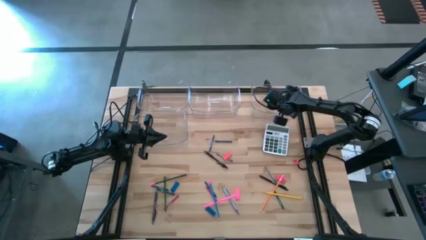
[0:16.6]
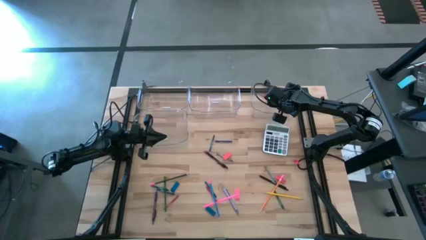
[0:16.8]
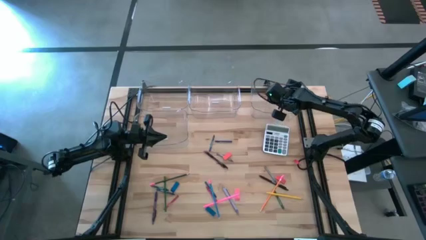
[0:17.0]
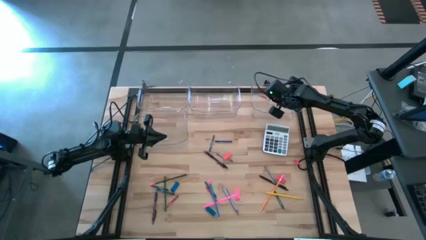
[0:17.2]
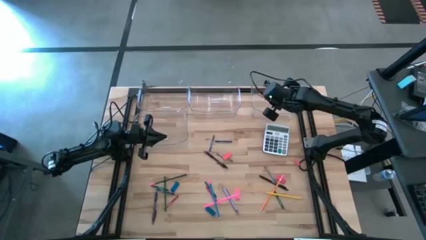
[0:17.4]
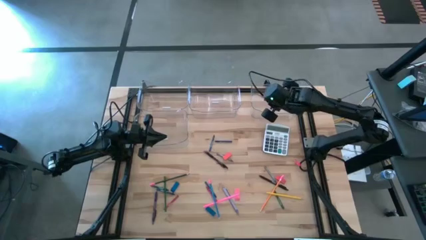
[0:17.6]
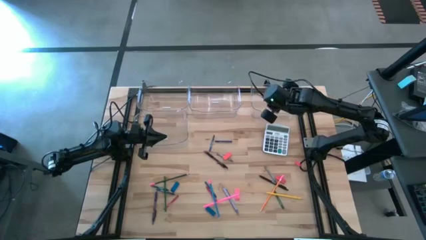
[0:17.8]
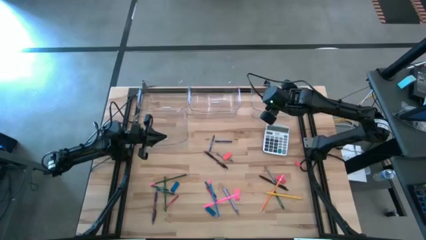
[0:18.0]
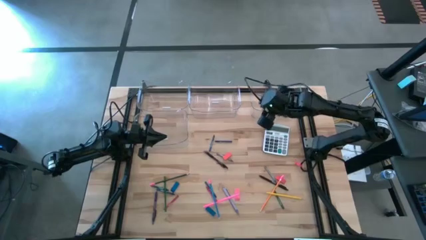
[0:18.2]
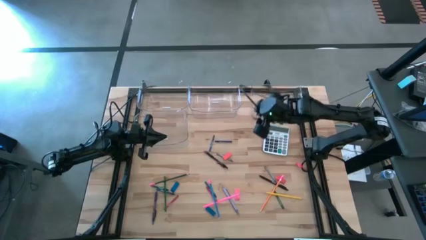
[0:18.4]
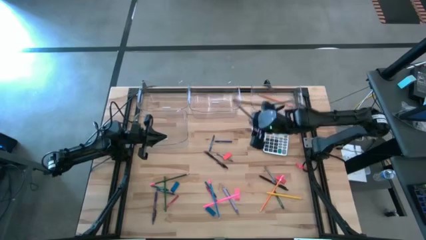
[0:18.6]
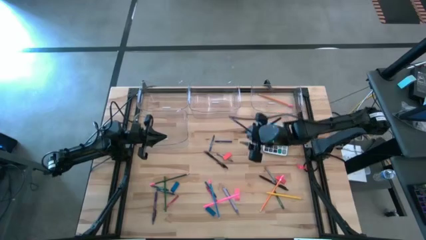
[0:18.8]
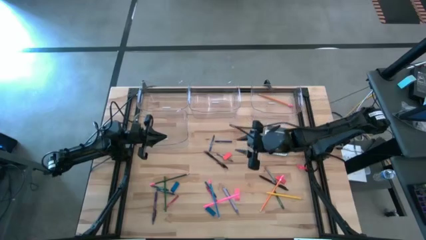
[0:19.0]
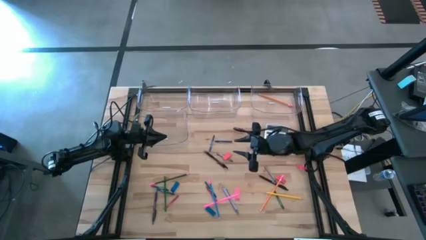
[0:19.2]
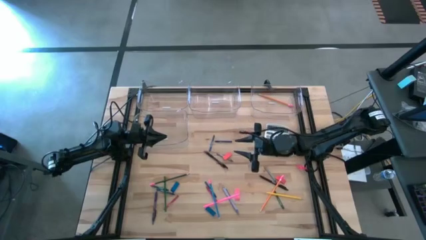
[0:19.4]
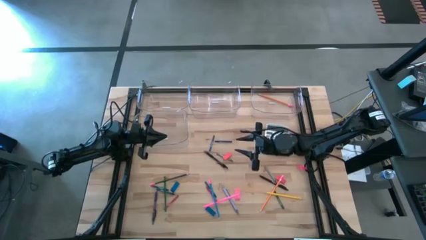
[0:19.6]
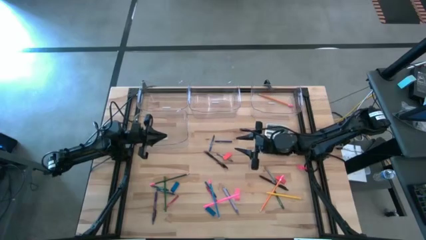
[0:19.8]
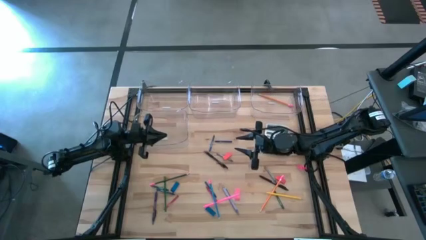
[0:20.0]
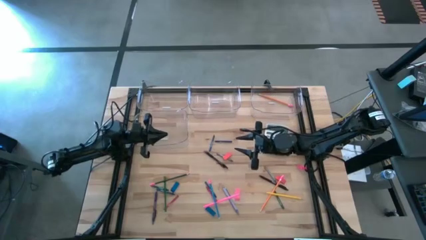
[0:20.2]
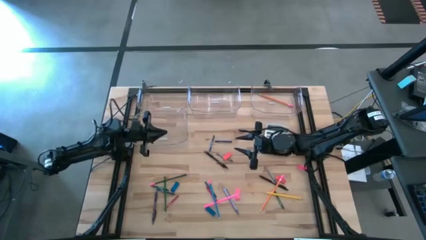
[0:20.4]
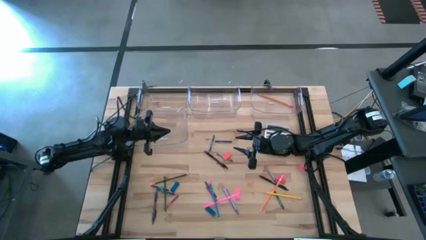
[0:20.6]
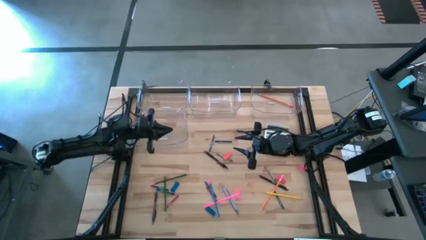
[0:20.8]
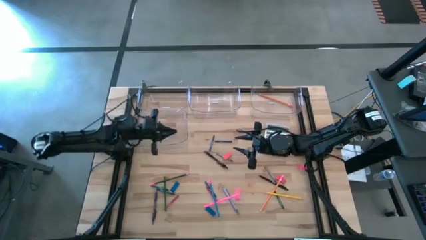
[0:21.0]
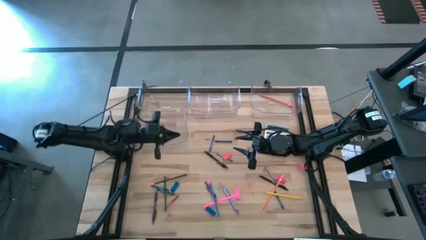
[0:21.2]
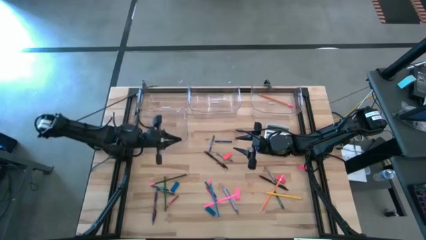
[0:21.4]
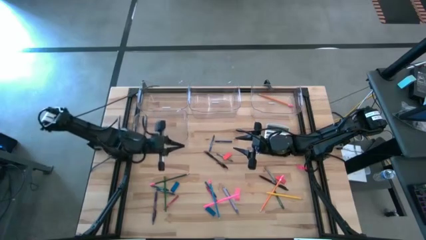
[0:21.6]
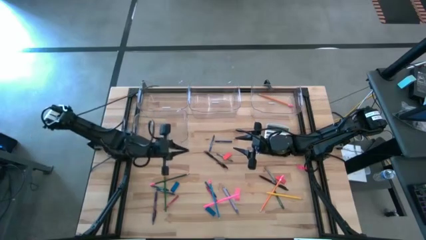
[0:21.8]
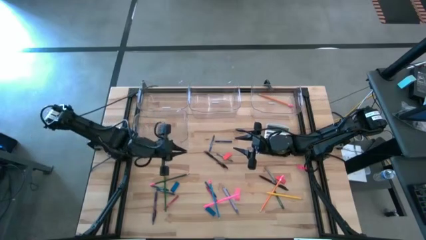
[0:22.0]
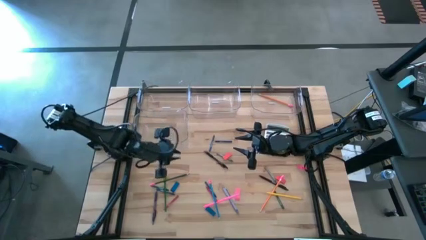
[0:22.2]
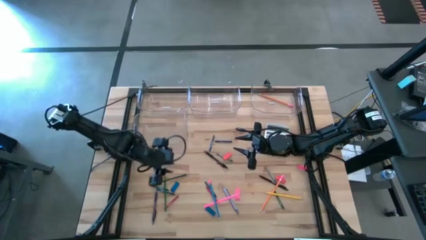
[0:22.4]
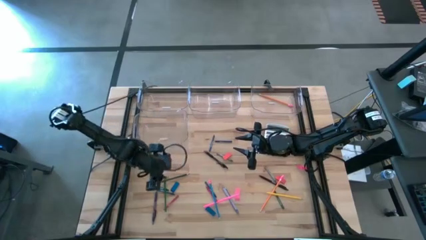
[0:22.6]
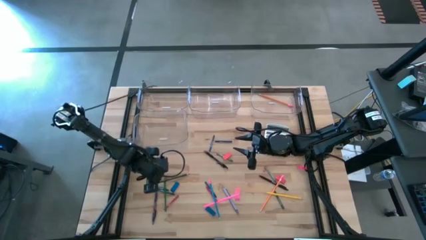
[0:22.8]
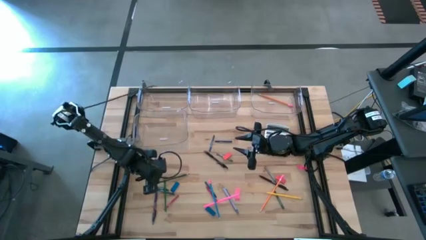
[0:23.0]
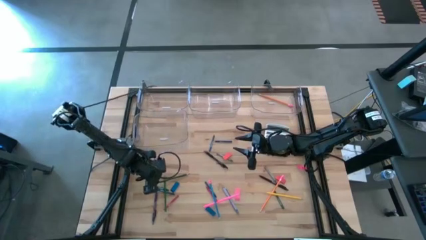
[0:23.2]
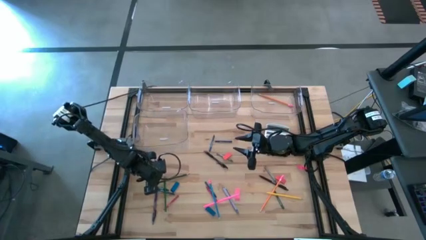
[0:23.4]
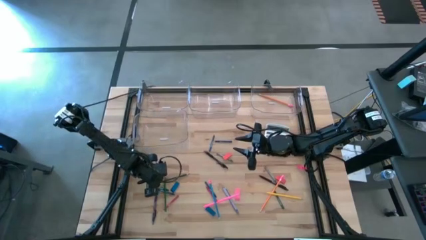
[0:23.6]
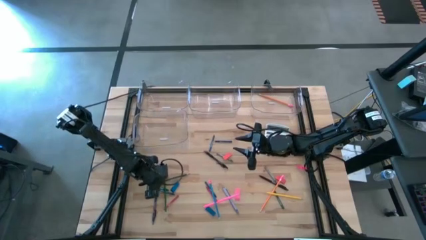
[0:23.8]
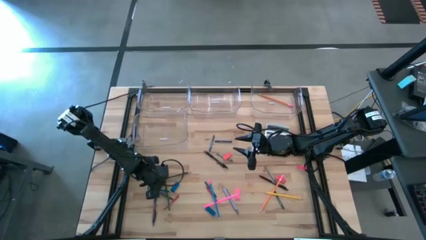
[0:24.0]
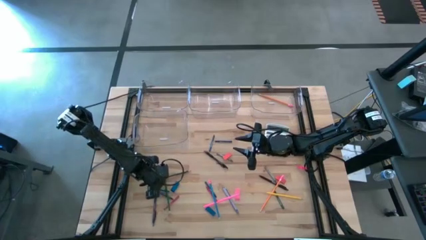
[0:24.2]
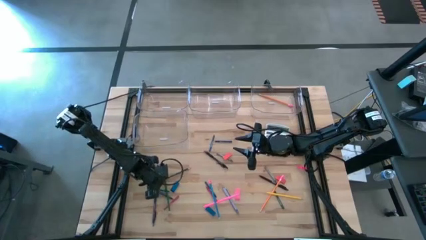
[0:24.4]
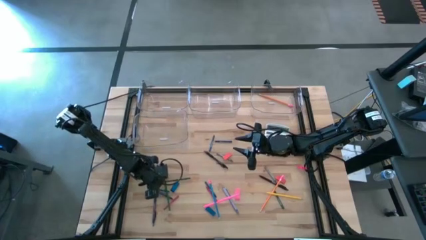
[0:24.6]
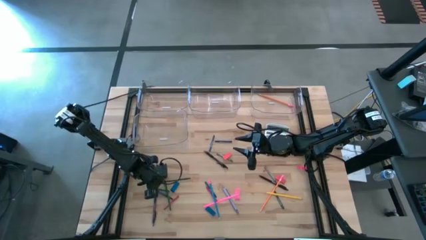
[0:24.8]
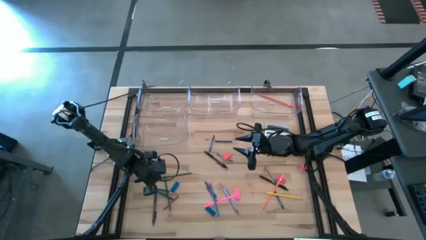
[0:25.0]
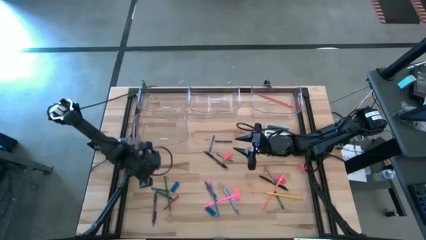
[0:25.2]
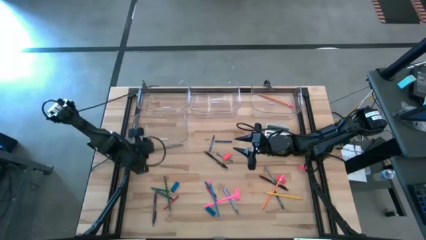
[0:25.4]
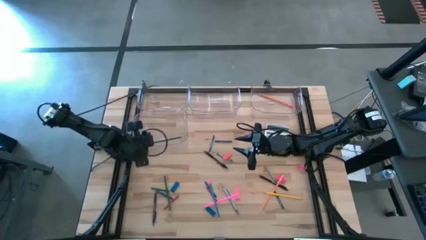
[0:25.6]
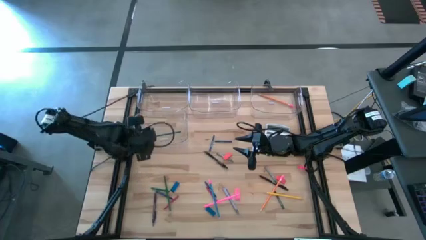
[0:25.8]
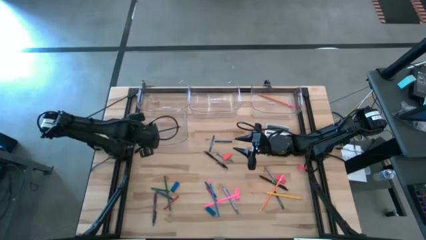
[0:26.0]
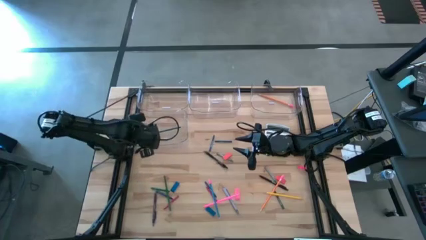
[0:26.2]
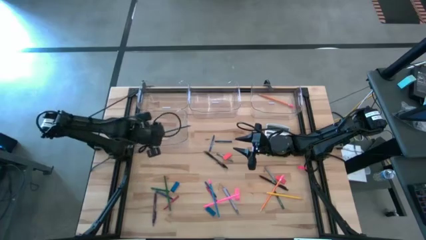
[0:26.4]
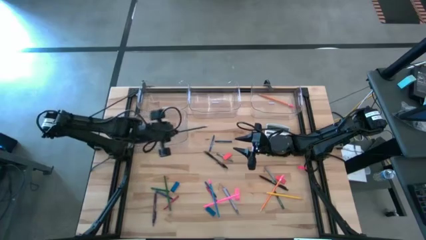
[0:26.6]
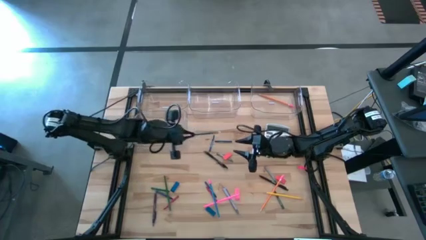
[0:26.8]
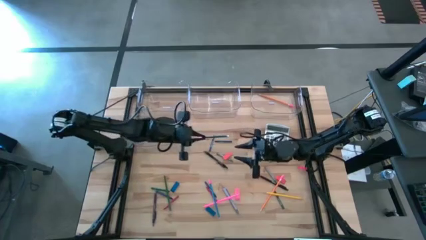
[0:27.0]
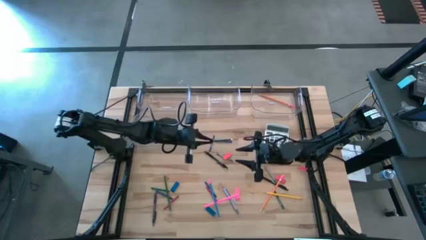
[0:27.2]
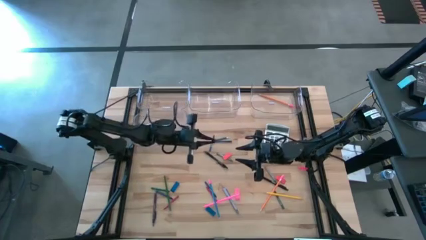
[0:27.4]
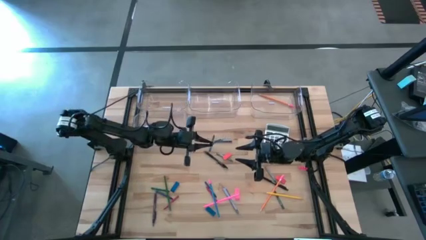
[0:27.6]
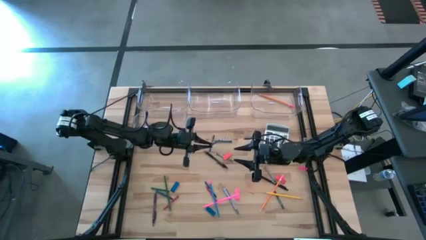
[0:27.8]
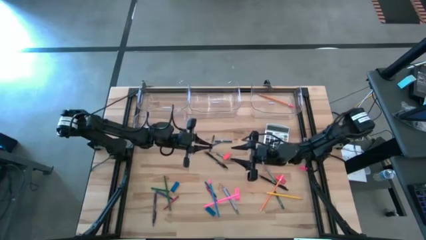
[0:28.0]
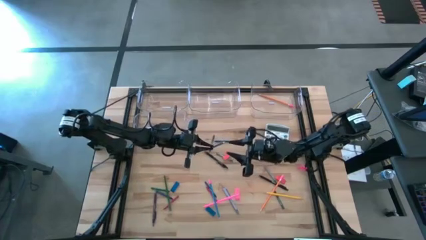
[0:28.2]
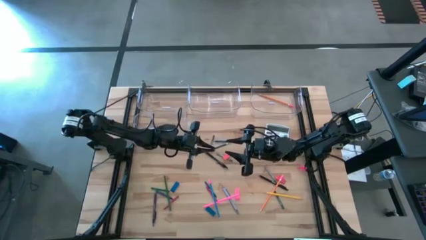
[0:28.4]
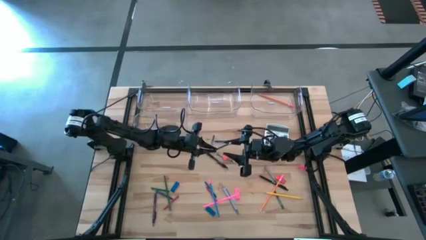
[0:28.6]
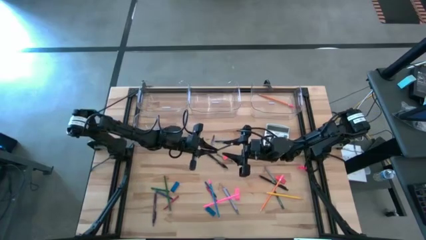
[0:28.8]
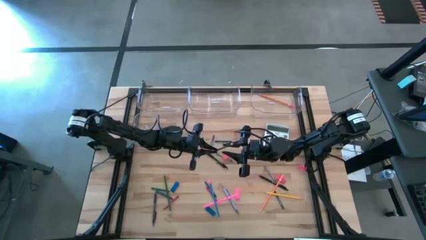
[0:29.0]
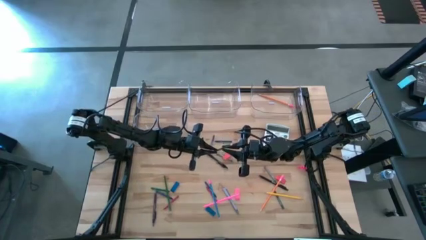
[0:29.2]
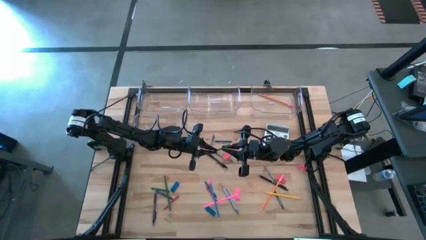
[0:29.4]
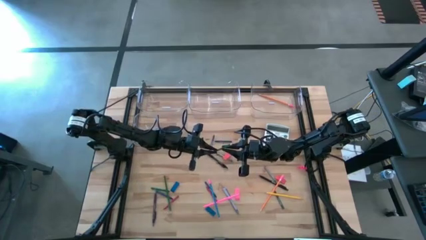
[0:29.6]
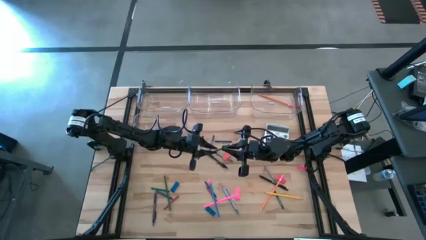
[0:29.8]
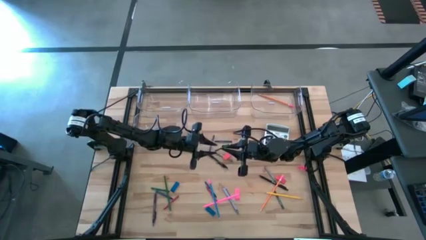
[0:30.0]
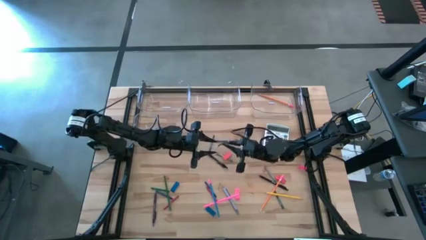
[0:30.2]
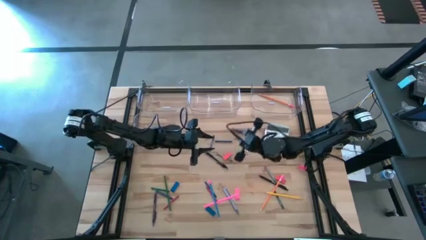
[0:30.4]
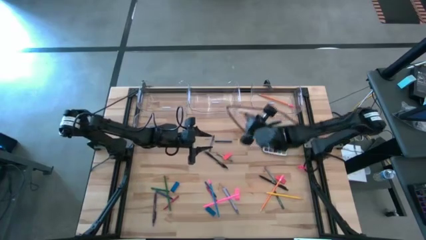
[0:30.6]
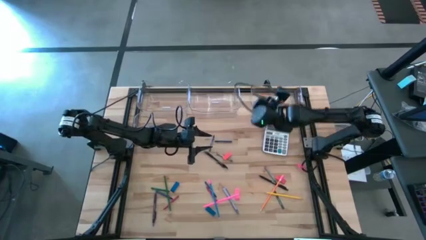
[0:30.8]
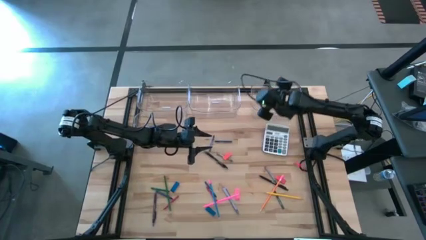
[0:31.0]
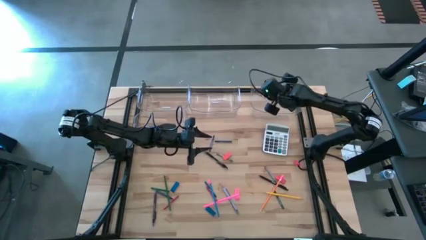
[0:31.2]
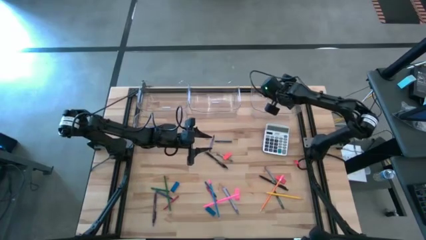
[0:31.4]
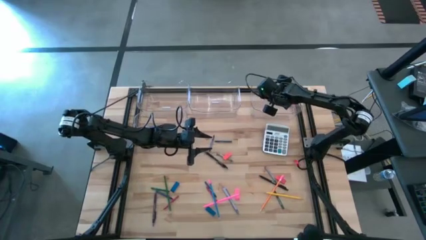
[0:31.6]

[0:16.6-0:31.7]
Task: Sort crayons/erasers/pens/pencils in bins
Put the green pencil into the top right transparent bin
